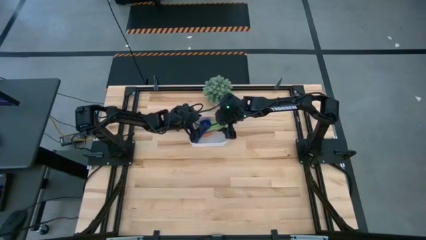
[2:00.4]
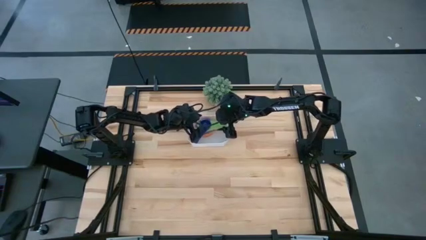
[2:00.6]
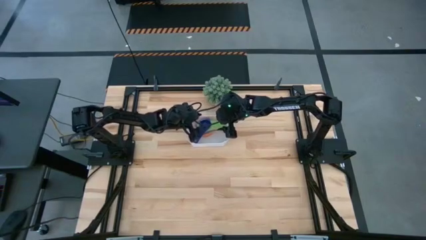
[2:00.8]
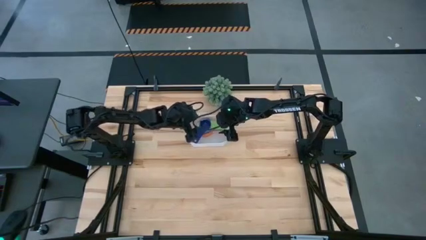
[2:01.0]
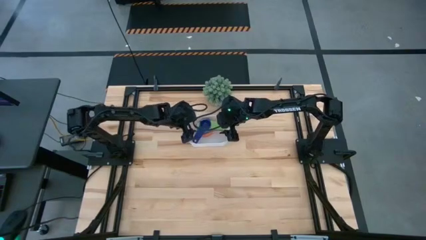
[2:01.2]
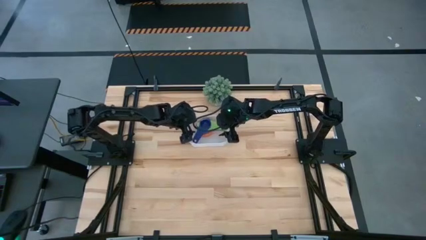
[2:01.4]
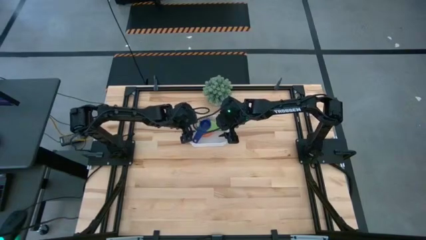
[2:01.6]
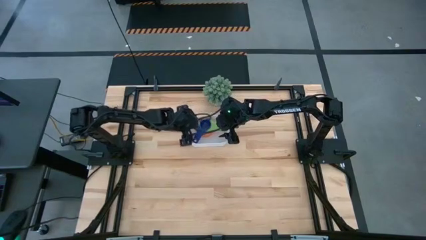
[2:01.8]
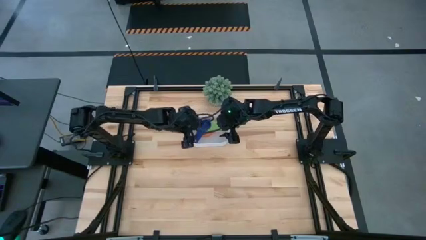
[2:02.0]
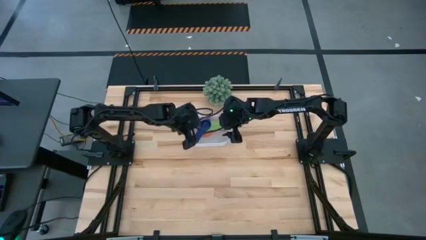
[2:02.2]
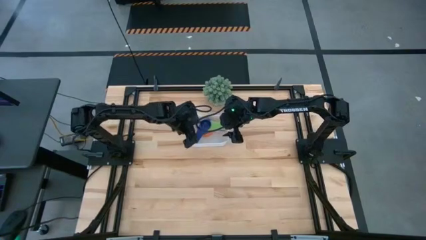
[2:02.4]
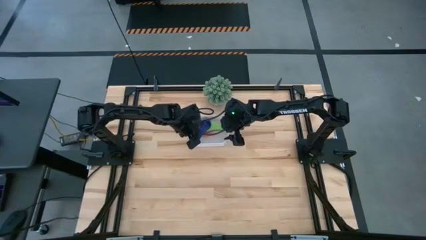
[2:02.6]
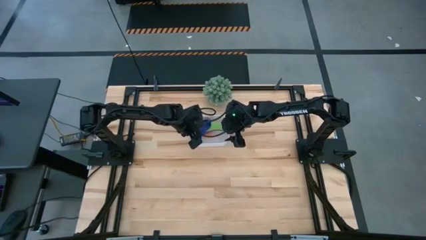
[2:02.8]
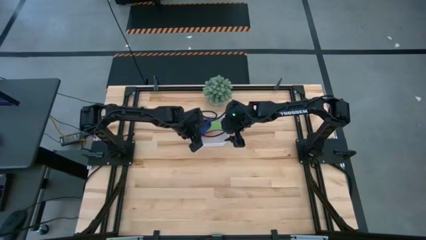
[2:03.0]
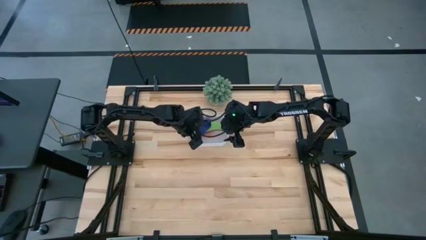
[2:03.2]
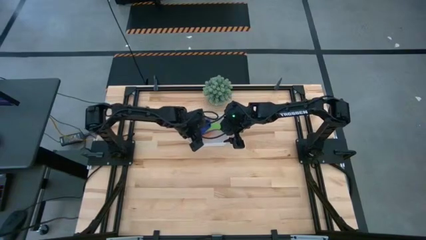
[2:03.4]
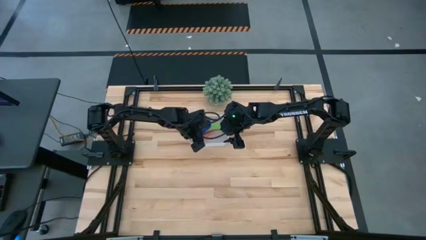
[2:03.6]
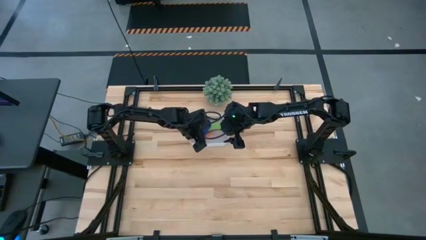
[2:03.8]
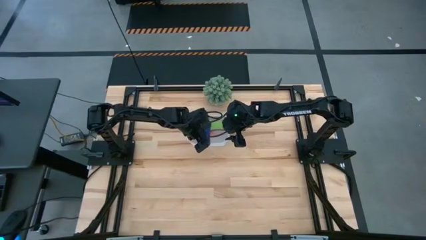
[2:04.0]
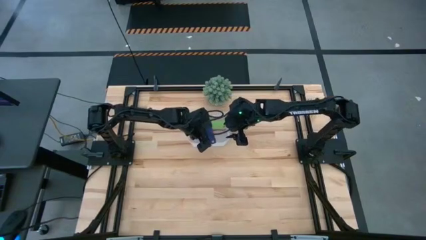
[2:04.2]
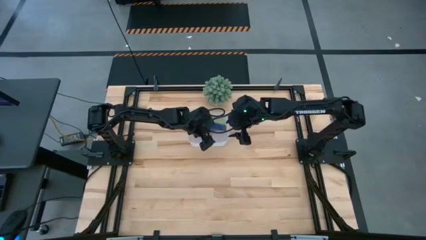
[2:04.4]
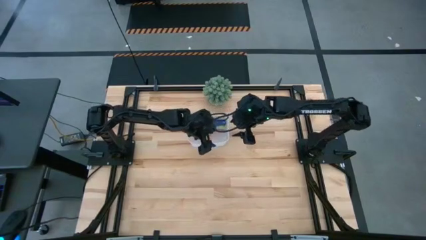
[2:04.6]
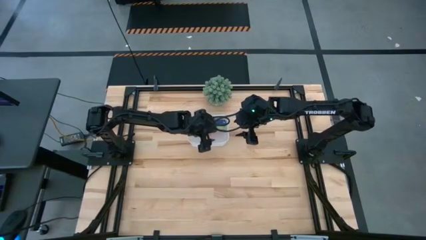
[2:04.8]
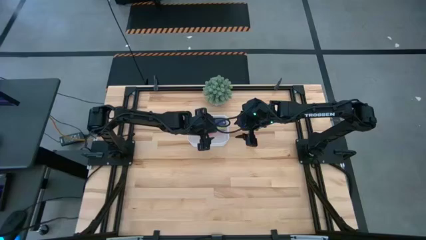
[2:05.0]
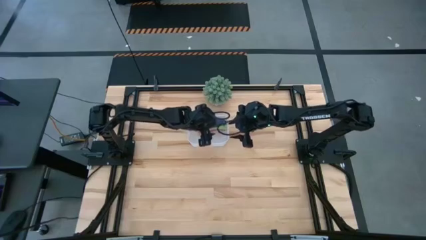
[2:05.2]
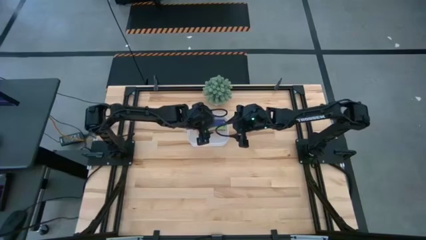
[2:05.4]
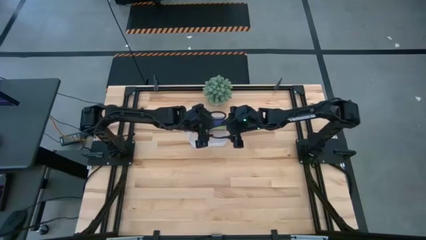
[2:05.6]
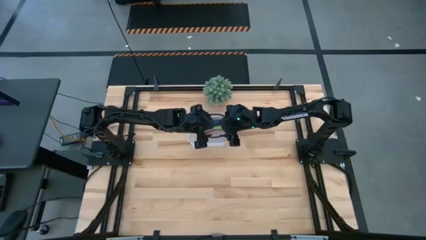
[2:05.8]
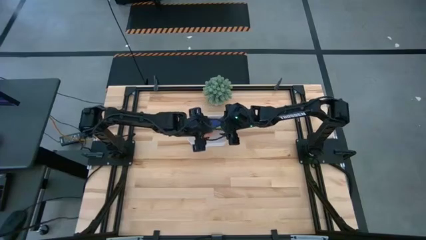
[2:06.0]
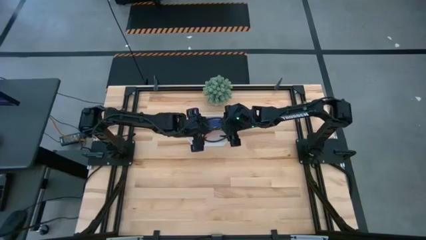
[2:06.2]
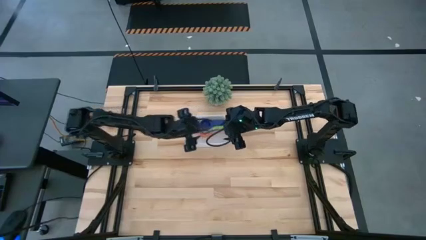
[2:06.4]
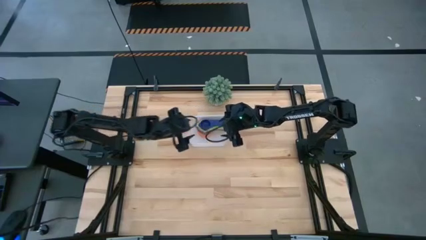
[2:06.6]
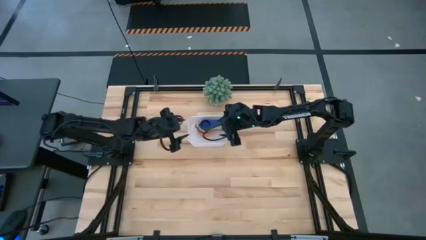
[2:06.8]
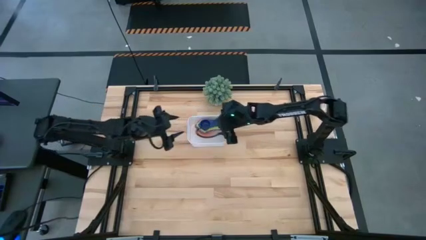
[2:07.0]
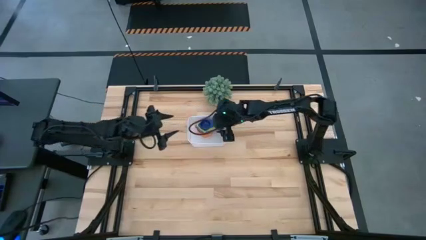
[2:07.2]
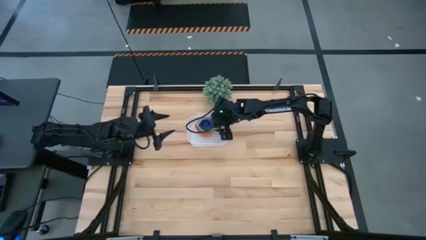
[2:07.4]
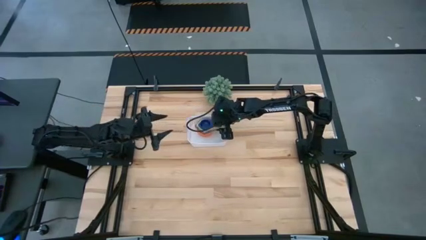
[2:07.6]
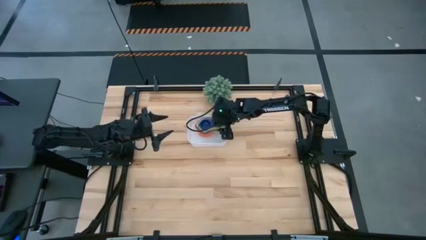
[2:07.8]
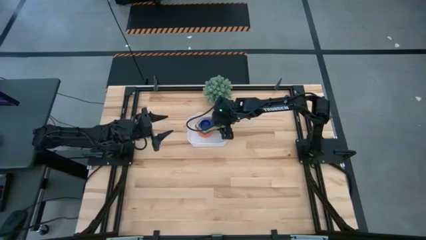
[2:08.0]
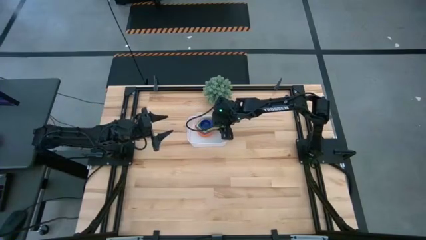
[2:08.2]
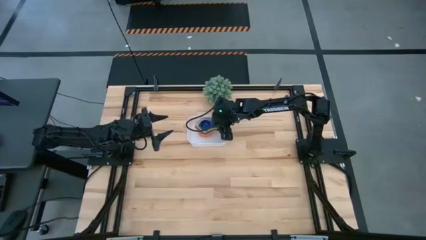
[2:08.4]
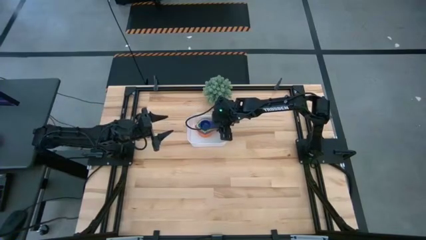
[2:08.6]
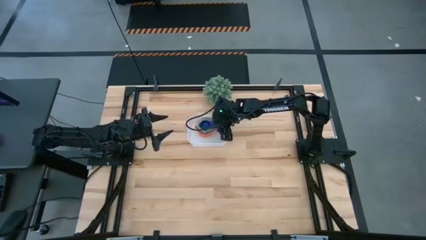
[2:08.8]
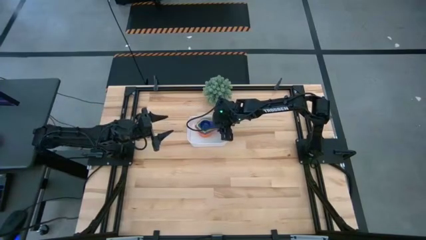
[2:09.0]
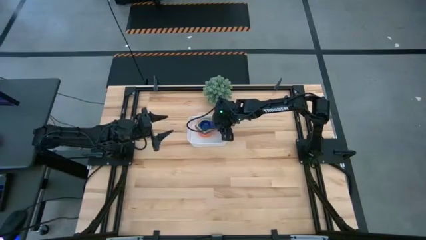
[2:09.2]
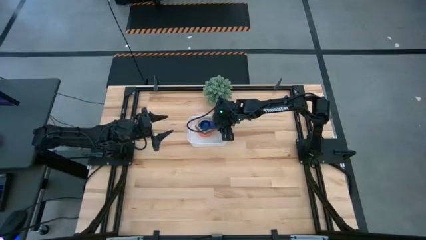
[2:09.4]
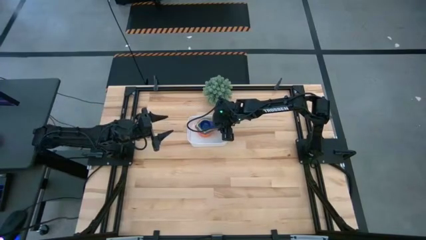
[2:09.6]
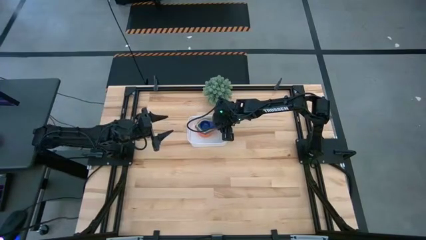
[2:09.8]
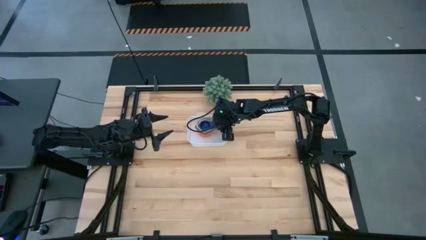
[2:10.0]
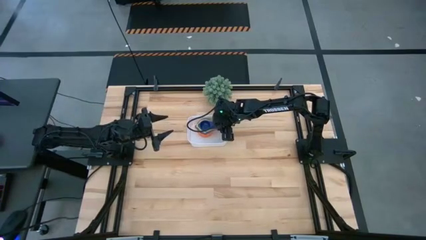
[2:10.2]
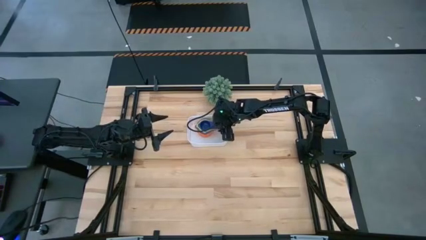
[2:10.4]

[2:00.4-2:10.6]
Task: Nest measuring cups in basket
Adjust the blue nesting cup to align with the other nesting cups in the bin

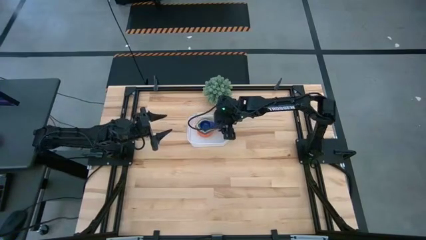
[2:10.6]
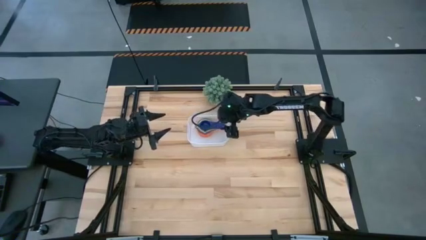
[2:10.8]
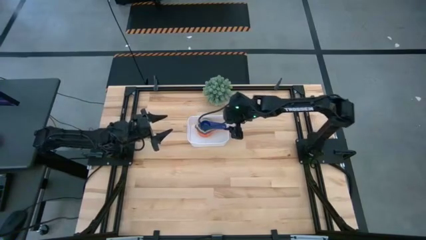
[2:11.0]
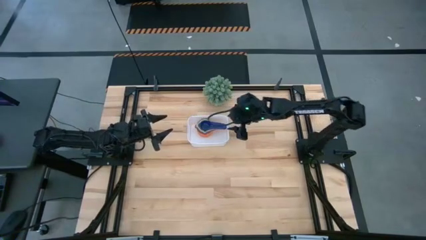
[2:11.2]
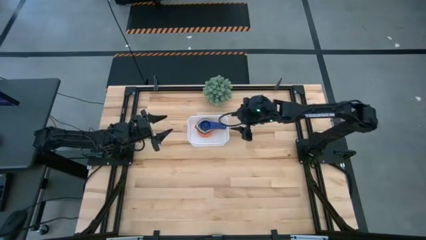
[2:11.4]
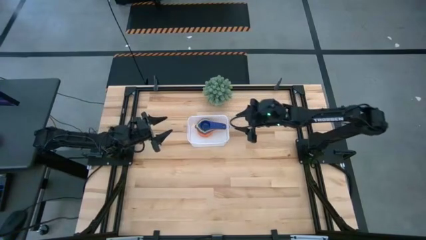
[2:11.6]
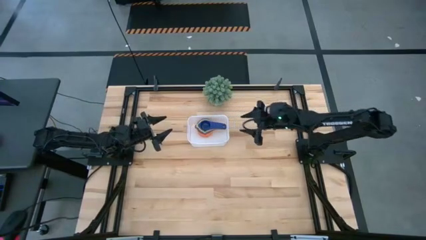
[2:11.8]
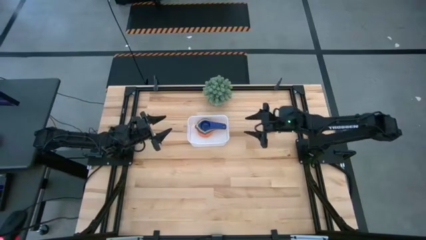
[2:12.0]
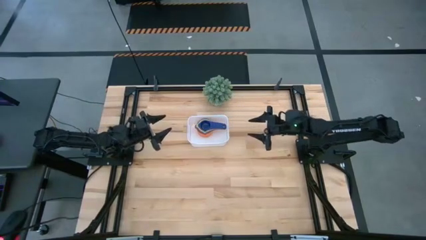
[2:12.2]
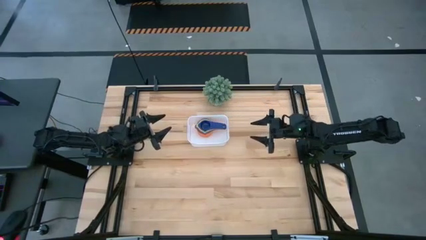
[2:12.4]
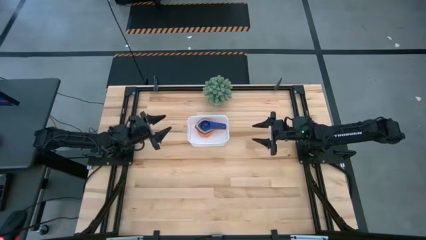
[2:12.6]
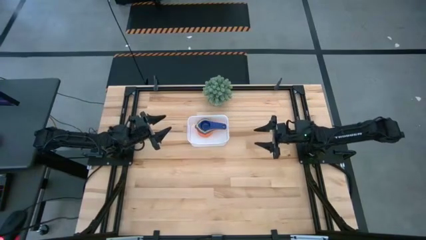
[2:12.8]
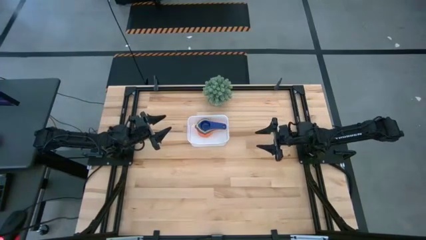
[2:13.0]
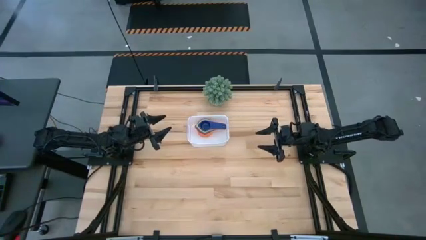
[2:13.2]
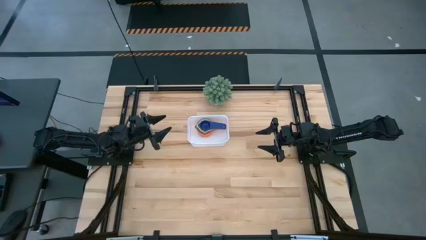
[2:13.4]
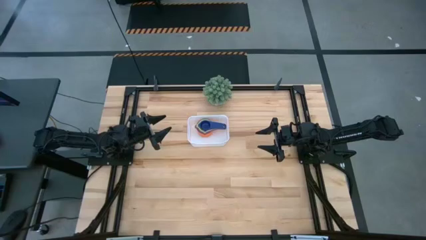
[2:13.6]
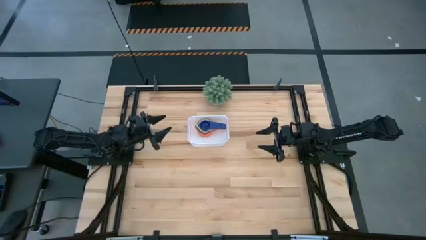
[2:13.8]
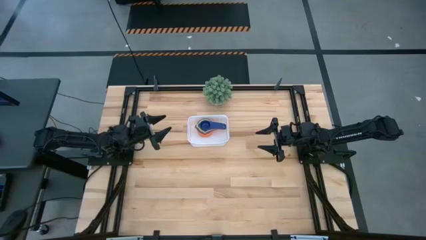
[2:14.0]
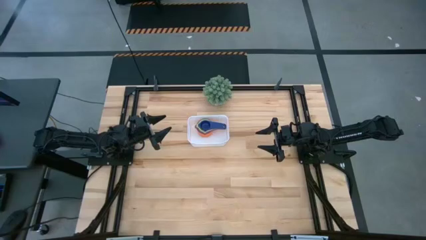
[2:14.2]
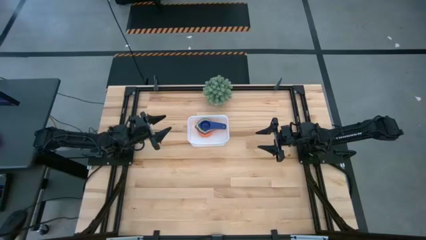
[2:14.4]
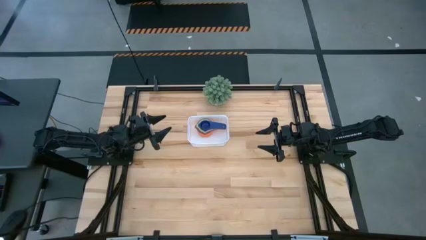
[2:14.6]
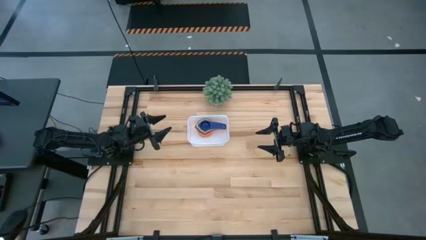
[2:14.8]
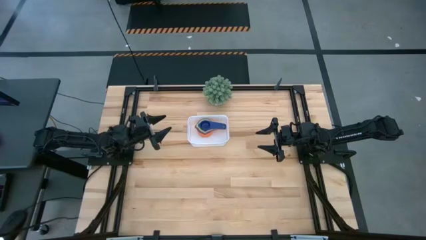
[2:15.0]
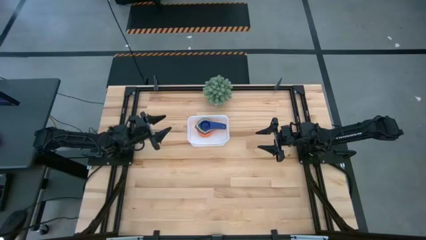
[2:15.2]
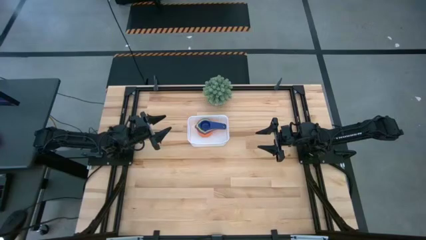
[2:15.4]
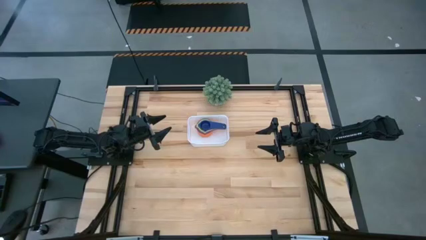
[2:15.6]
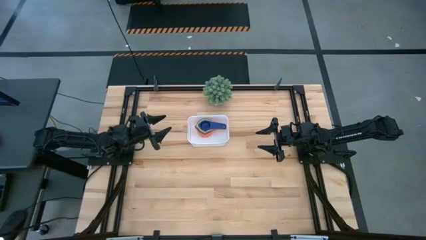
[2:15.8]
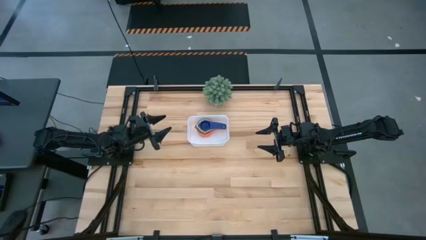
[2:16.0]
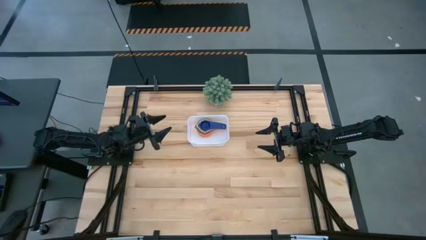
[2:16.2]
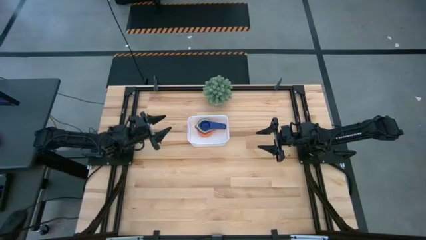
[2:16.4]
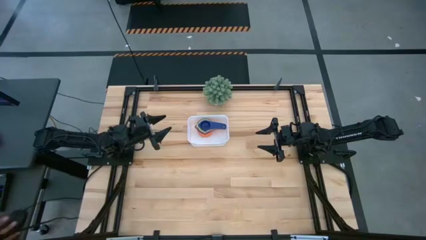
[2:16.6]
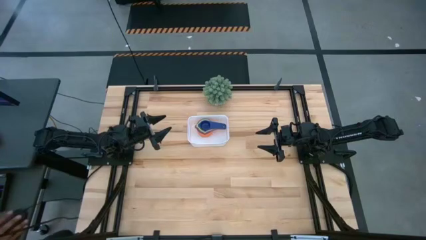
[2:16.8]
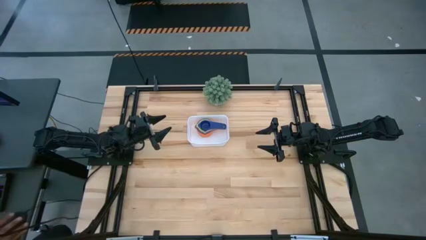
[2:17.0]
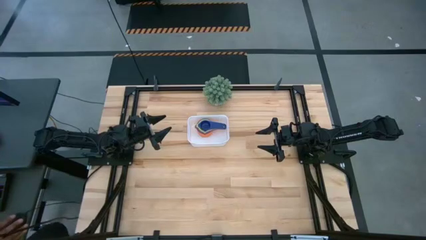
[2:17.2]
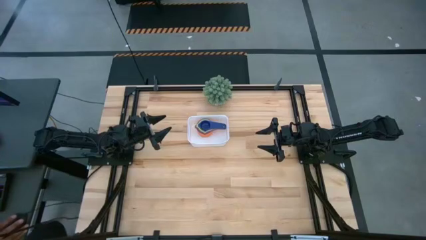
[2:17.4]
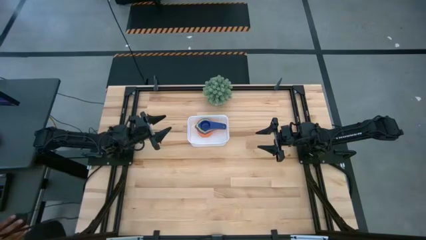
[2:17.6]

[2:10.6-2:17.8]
Return to Home Position
